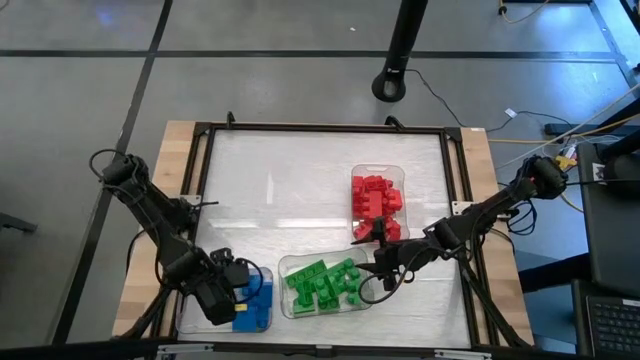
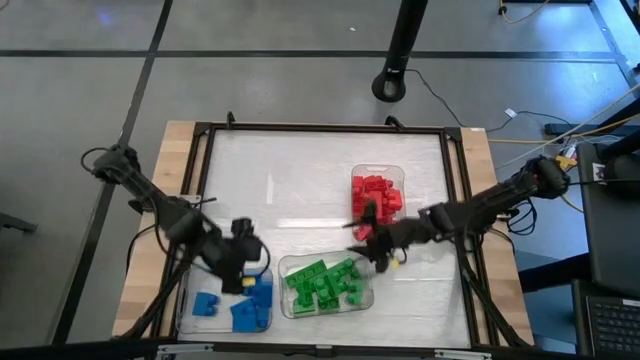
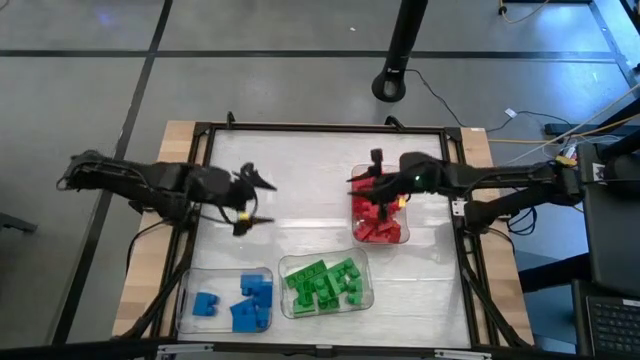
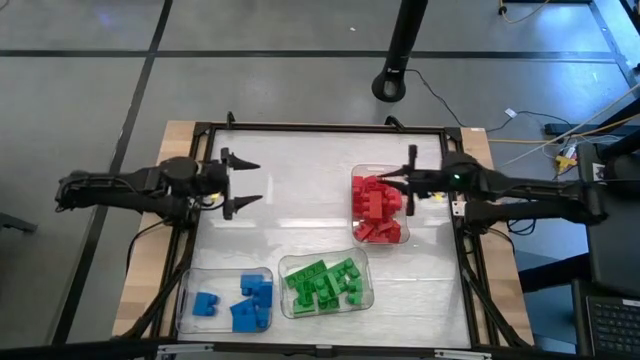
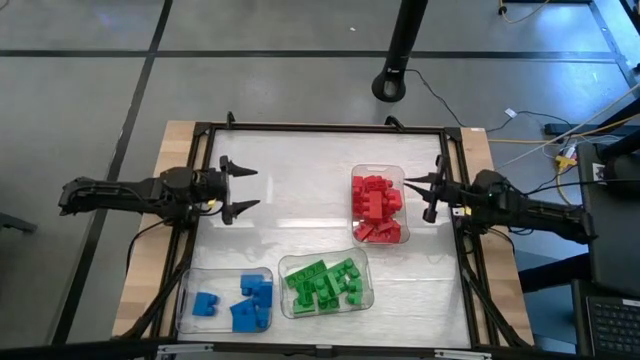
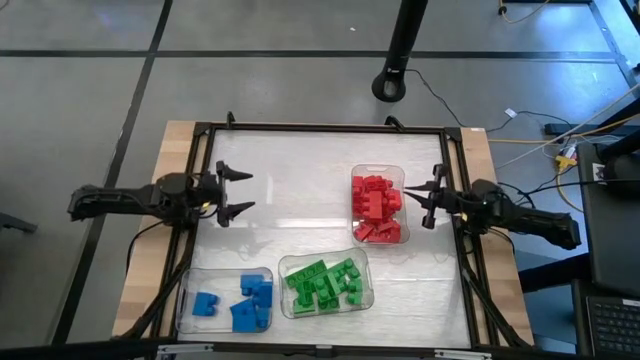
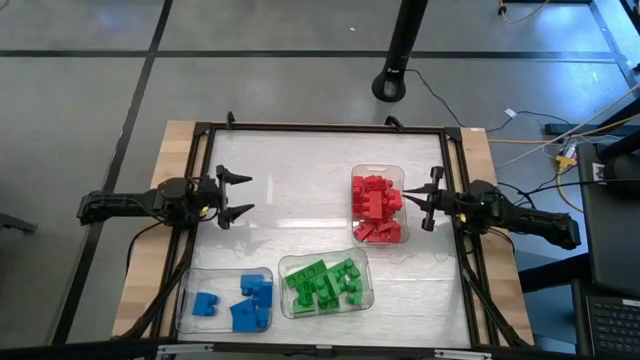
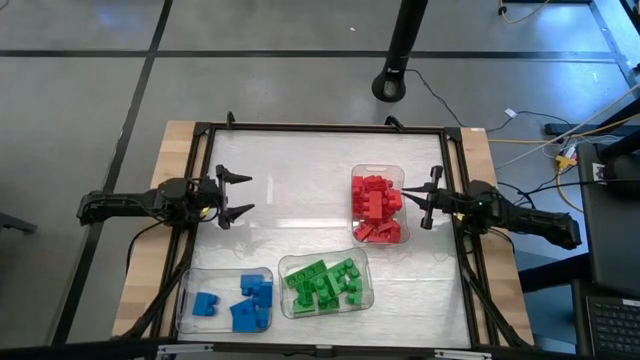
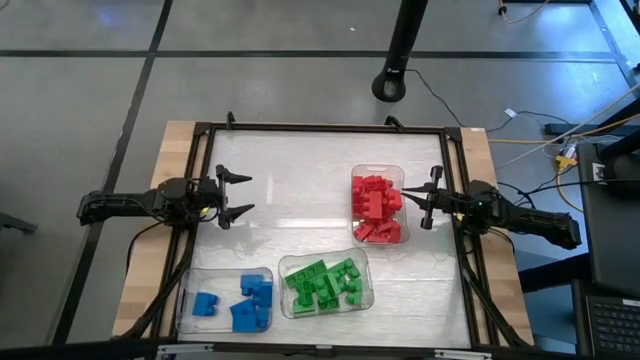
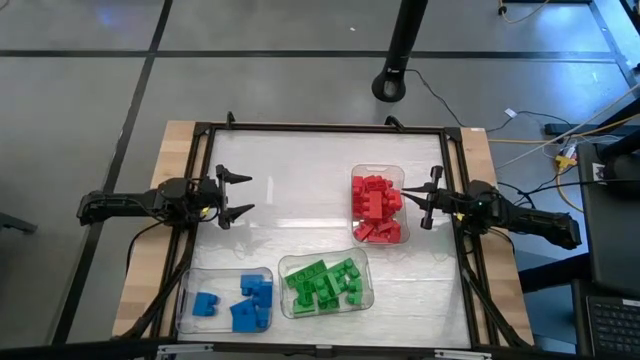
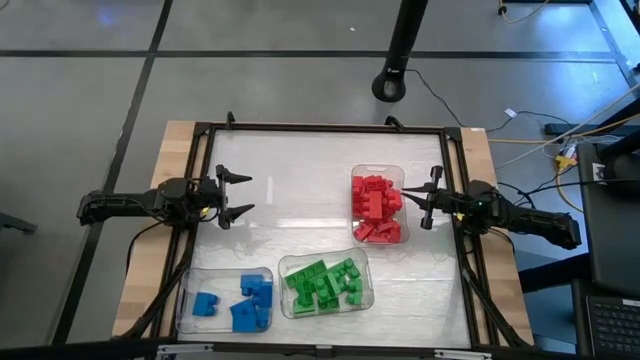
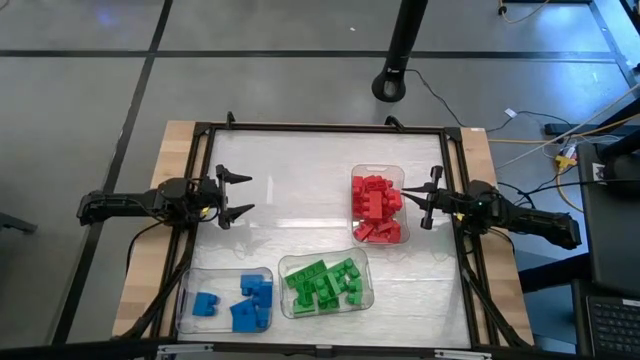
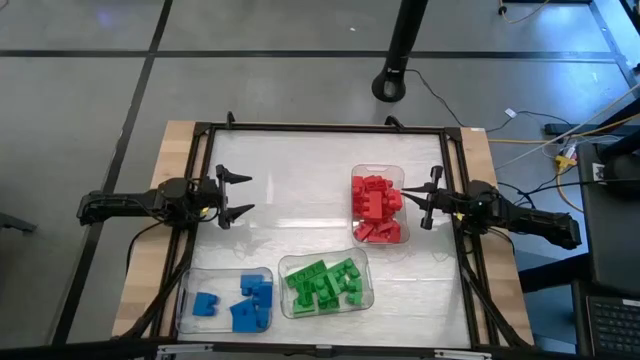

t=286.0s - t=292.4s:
Task: Sort blocks
Return to Home Position

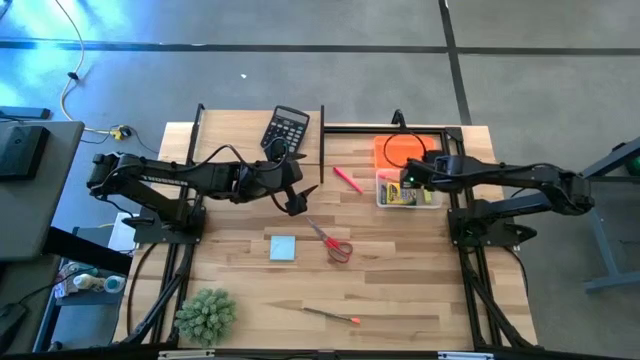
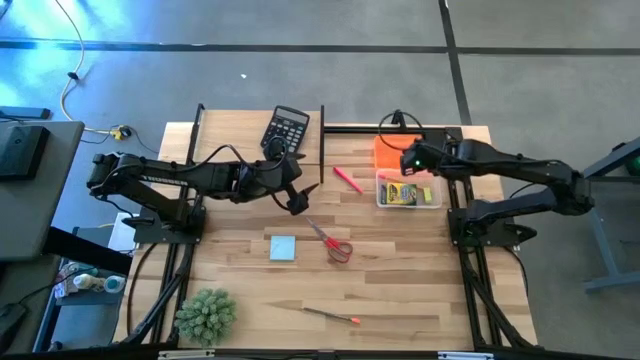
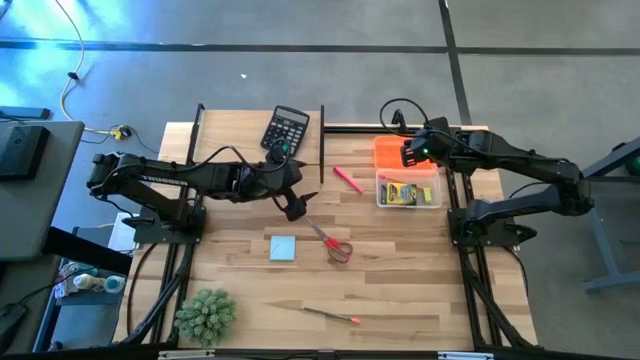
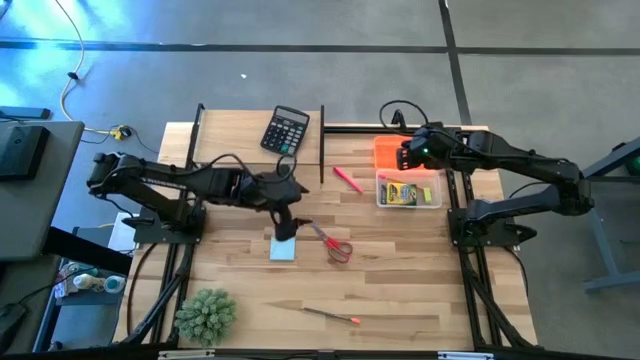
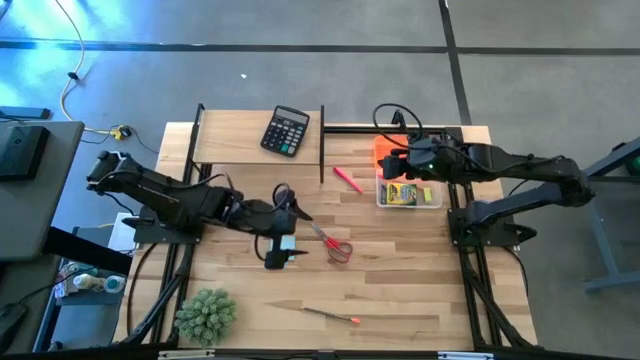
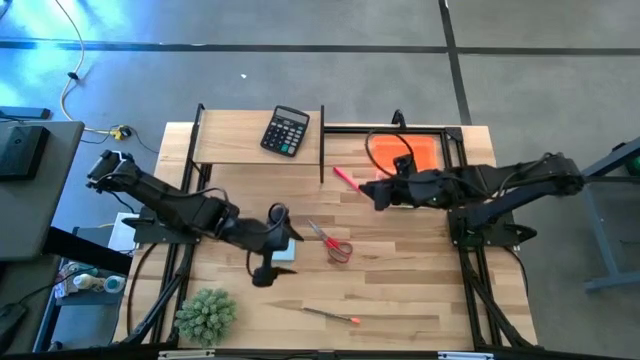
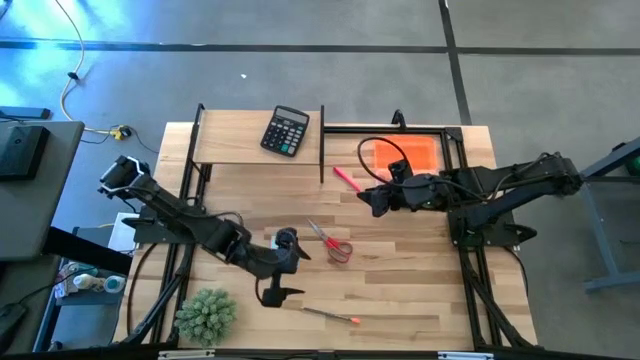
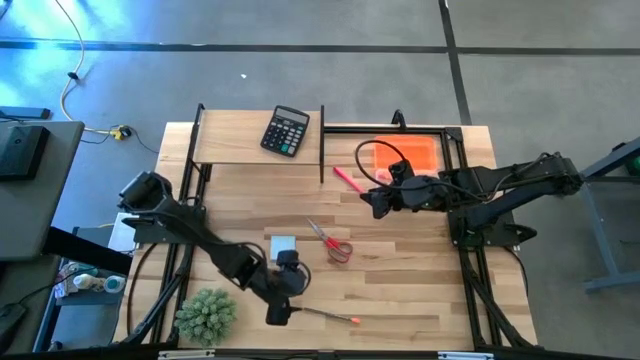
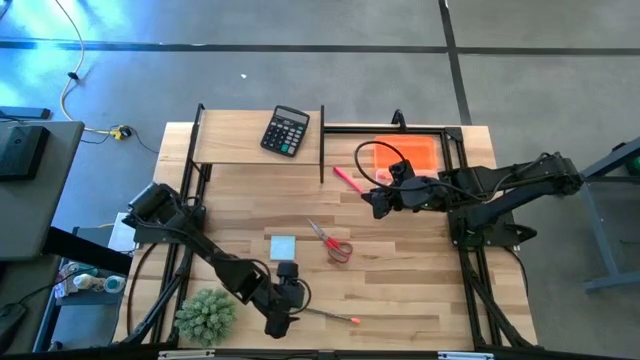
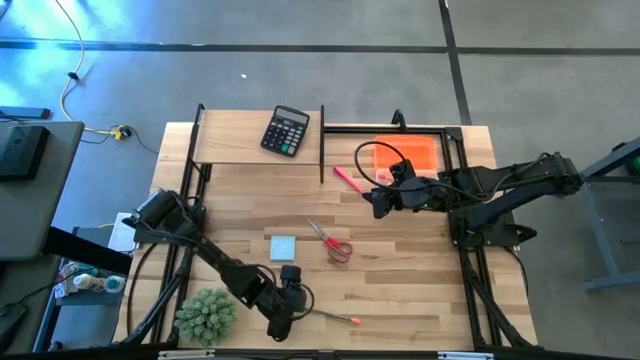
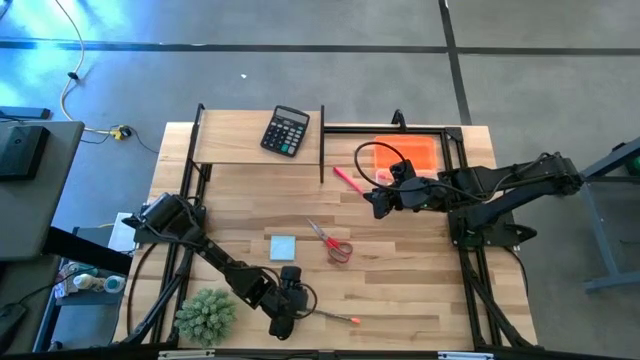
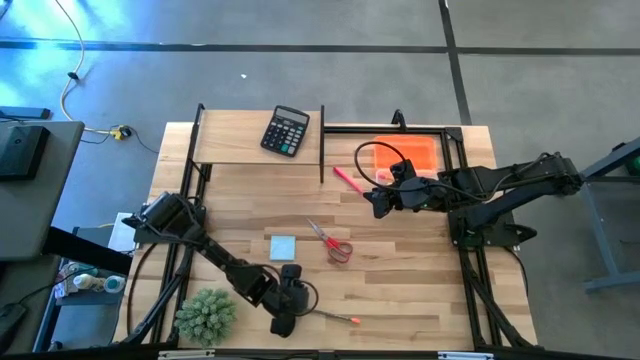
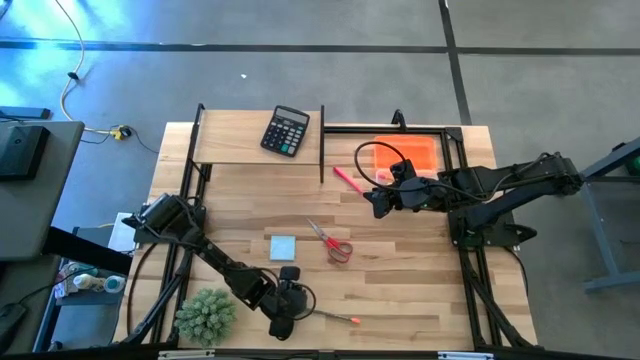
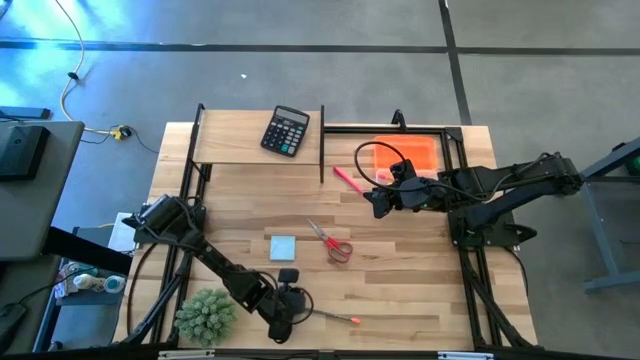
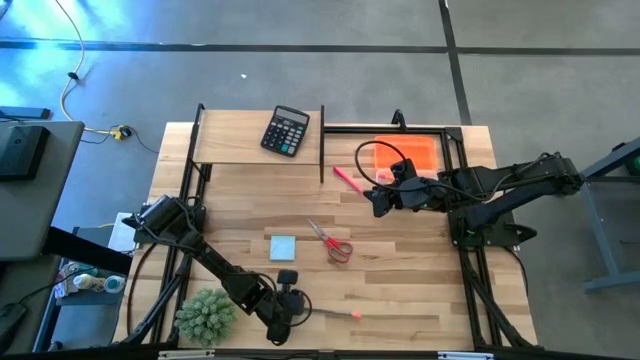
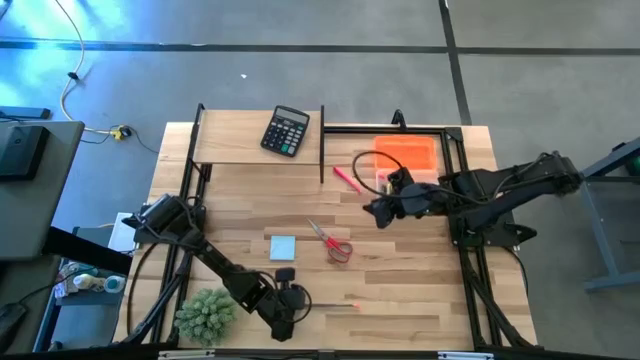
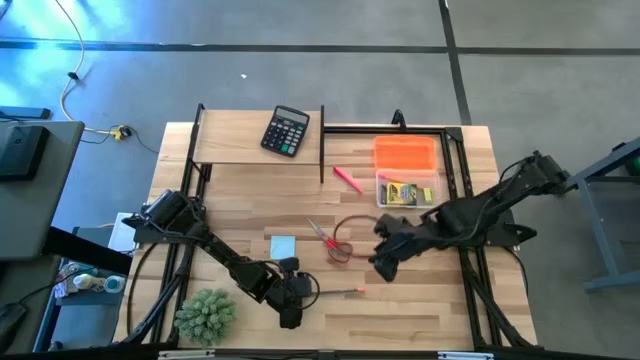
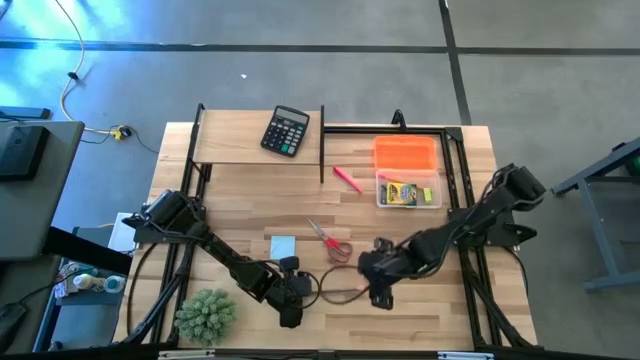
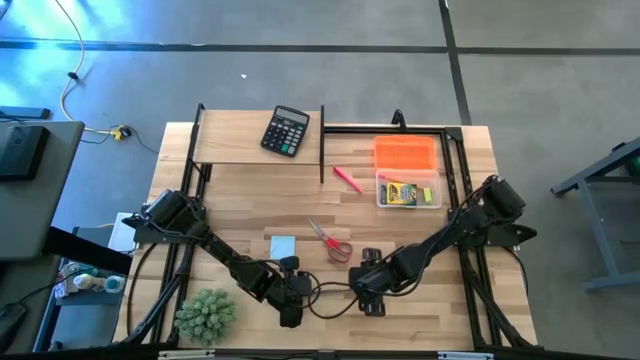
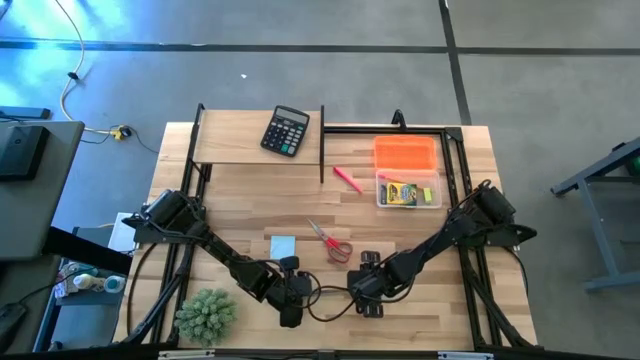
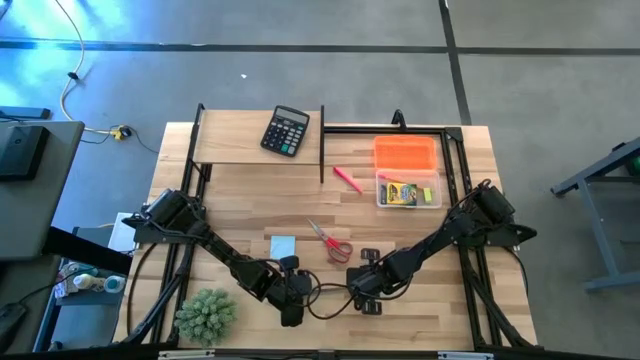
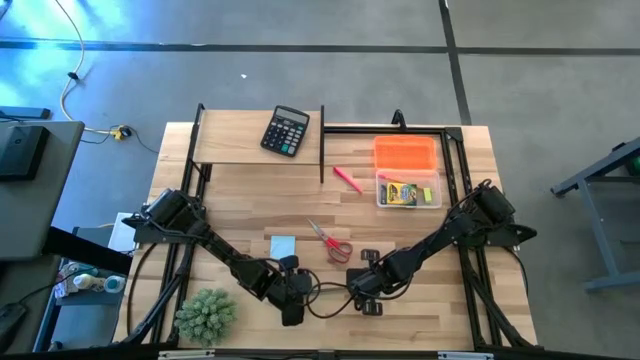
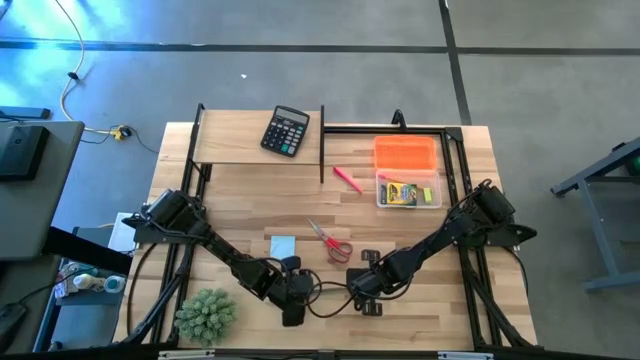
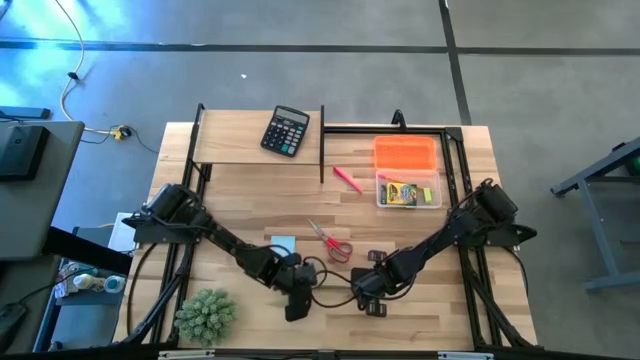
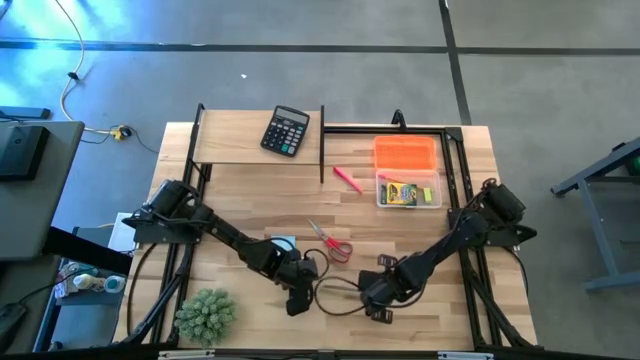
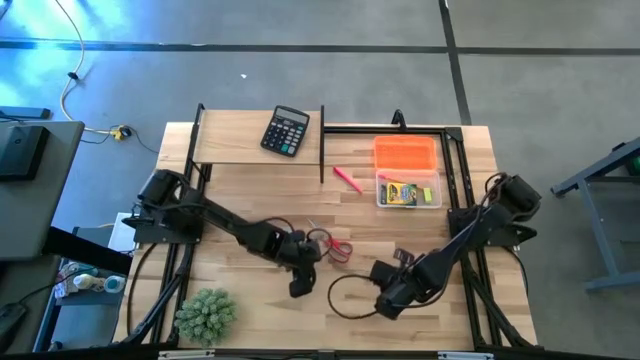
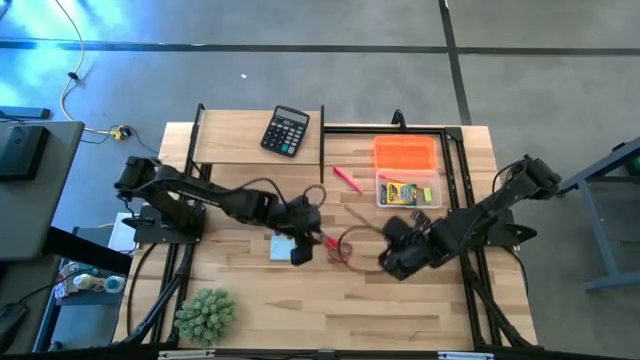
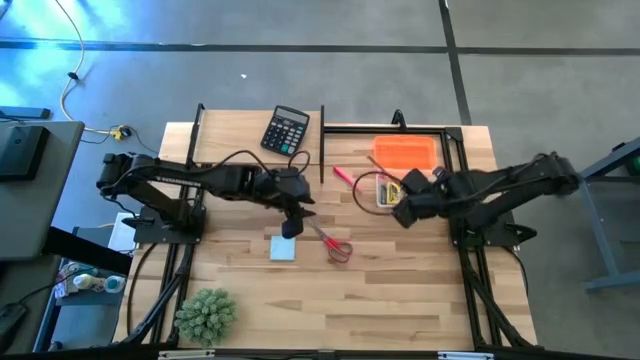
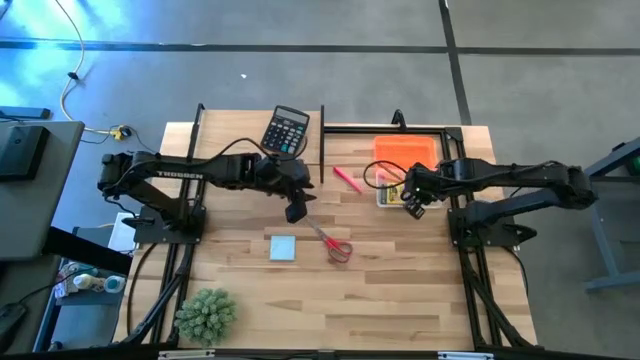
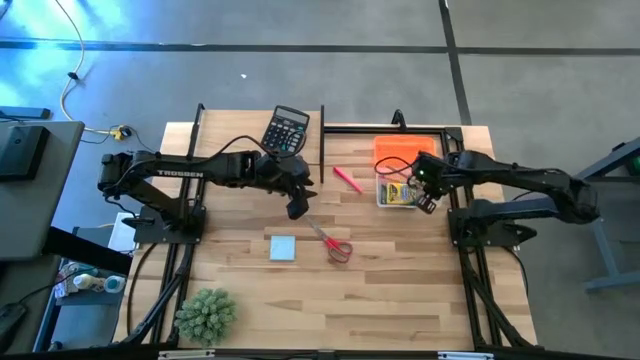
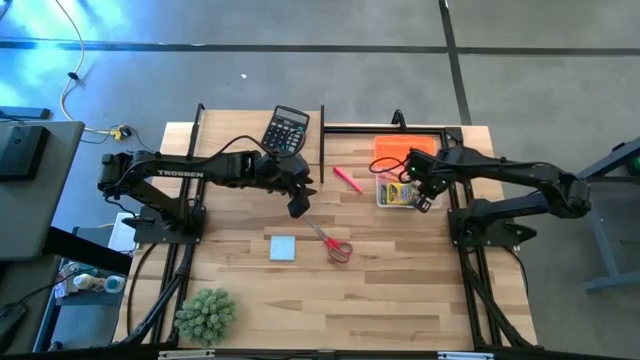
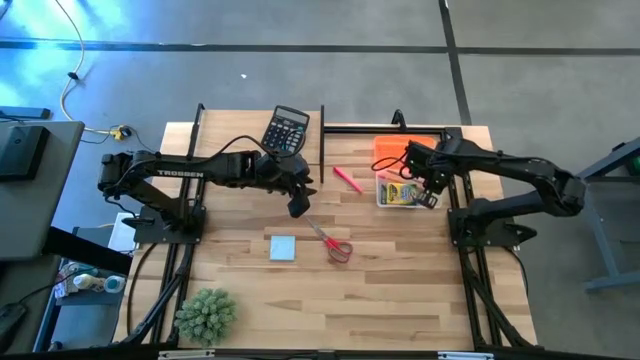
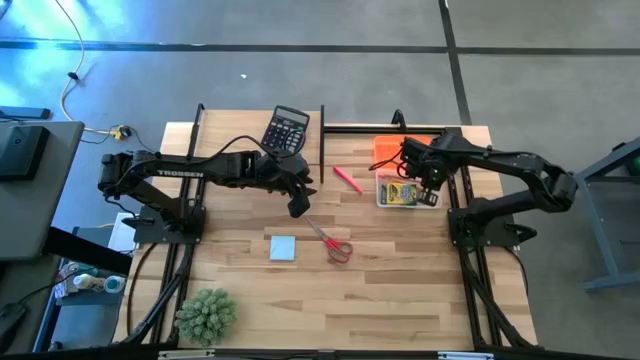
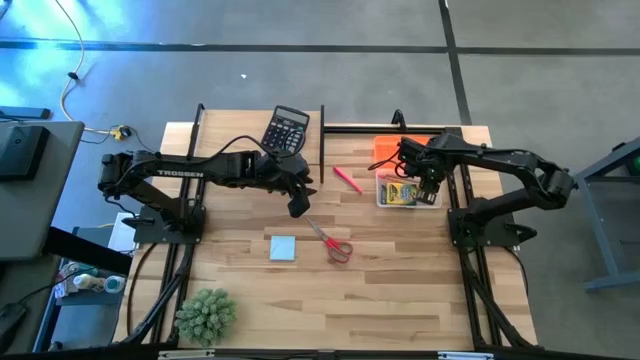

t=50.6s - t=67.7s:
Task: Pack school essentials
Put the black pencil into the orange supply box
